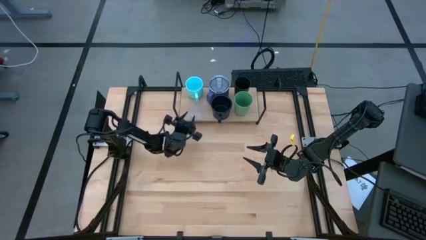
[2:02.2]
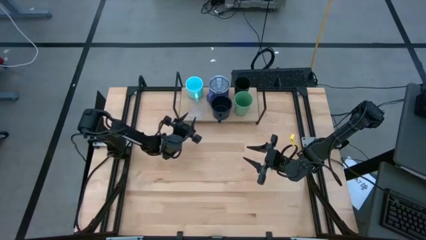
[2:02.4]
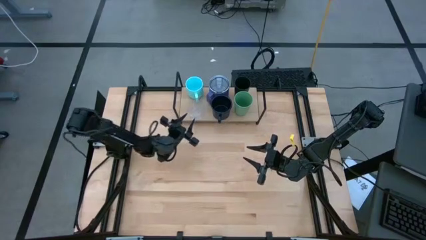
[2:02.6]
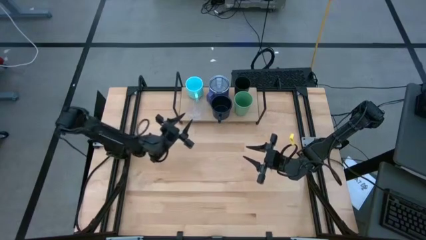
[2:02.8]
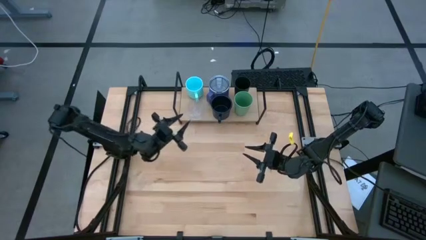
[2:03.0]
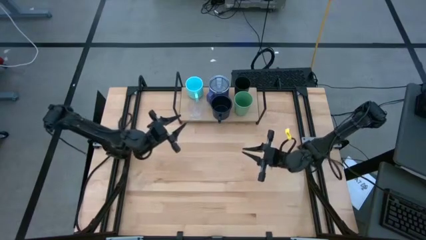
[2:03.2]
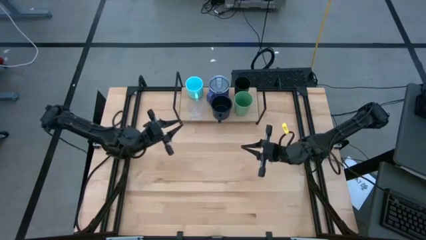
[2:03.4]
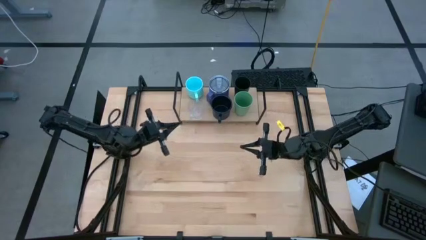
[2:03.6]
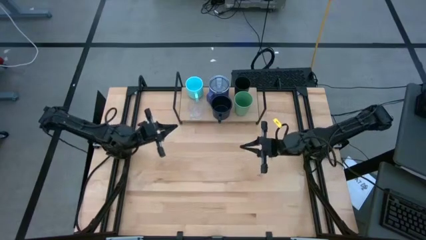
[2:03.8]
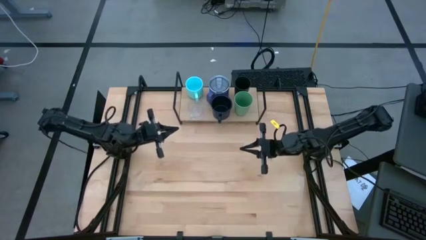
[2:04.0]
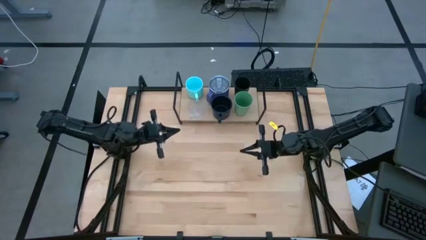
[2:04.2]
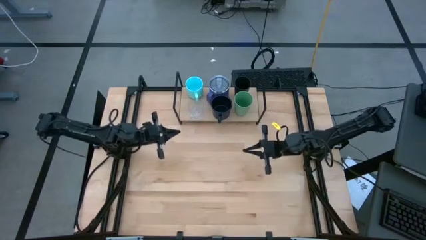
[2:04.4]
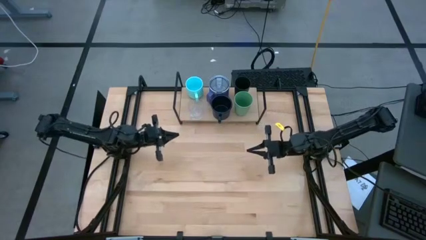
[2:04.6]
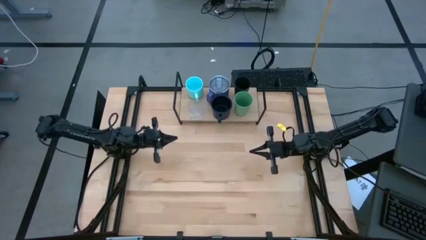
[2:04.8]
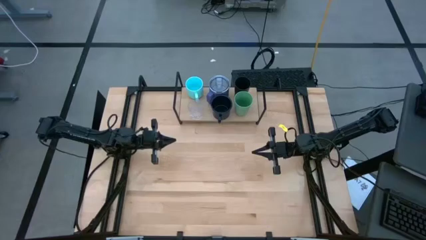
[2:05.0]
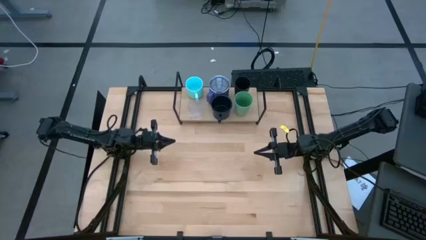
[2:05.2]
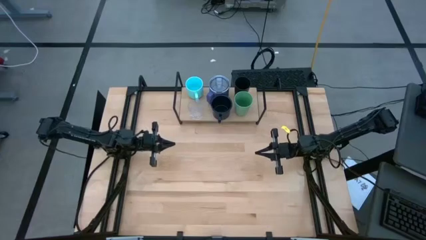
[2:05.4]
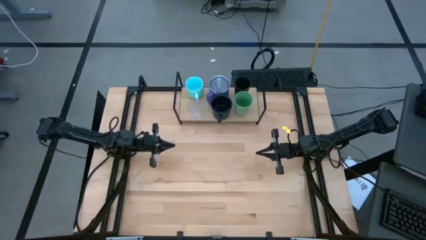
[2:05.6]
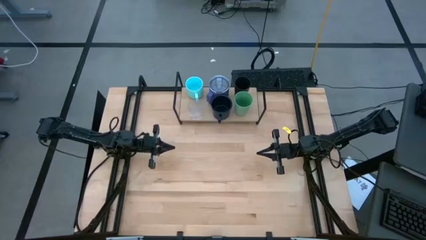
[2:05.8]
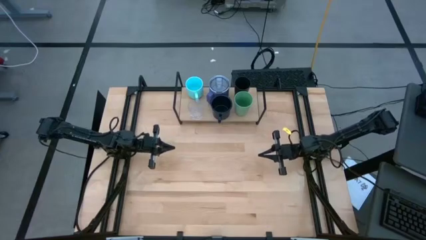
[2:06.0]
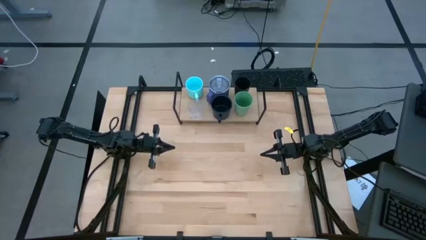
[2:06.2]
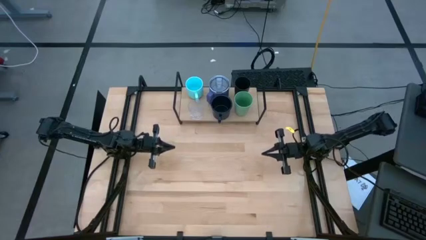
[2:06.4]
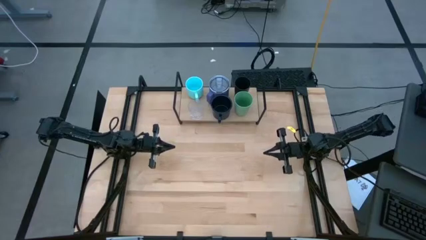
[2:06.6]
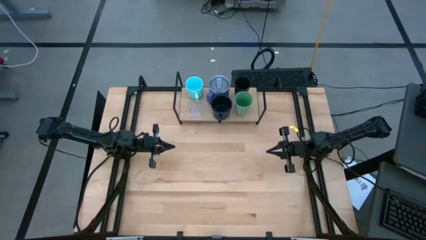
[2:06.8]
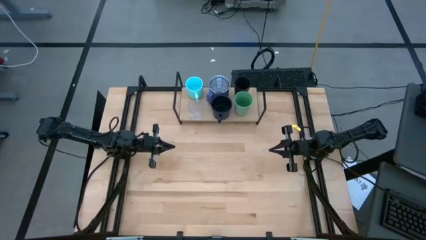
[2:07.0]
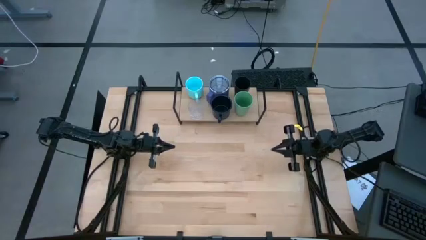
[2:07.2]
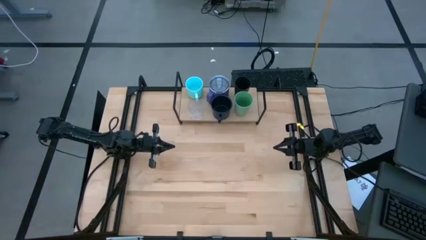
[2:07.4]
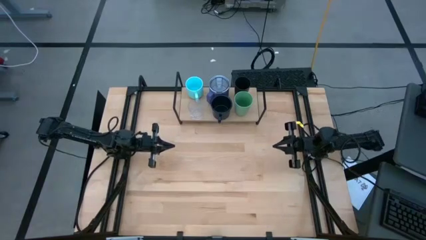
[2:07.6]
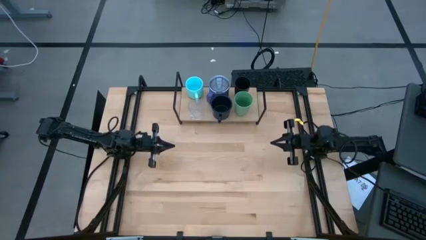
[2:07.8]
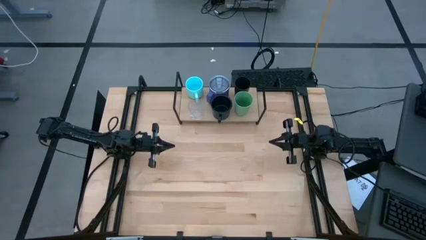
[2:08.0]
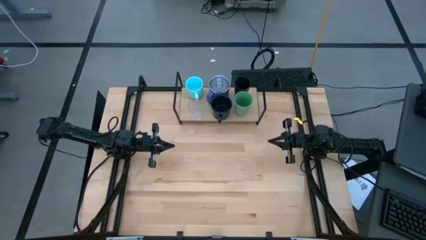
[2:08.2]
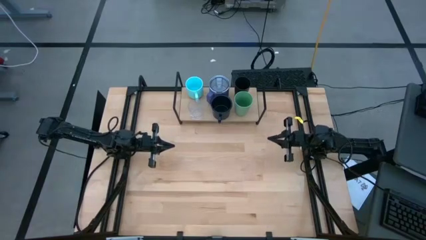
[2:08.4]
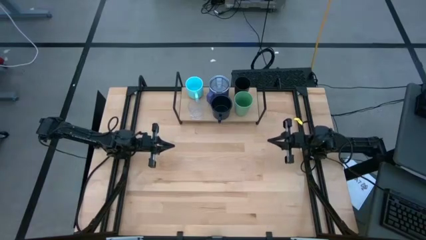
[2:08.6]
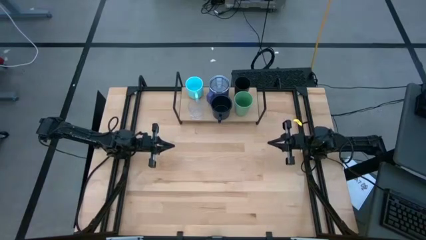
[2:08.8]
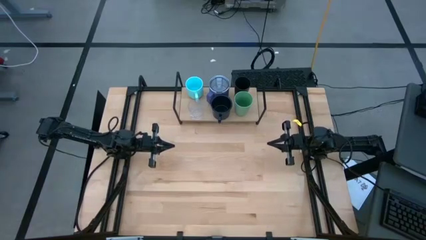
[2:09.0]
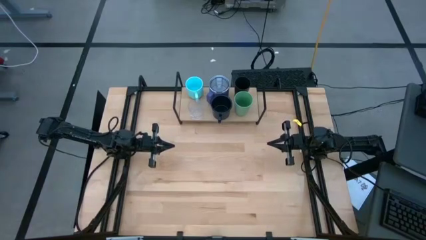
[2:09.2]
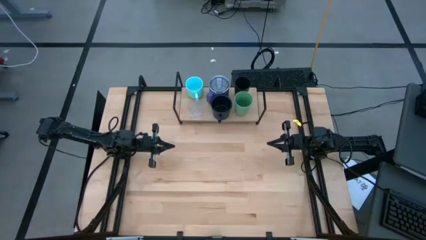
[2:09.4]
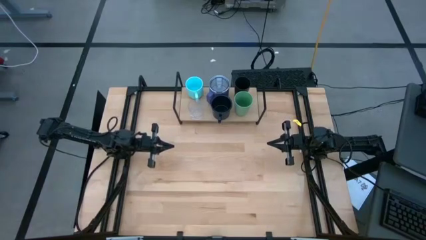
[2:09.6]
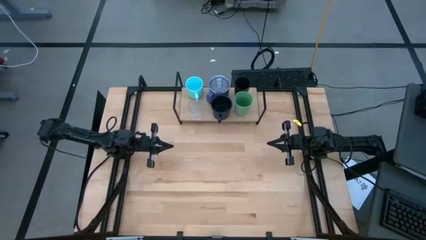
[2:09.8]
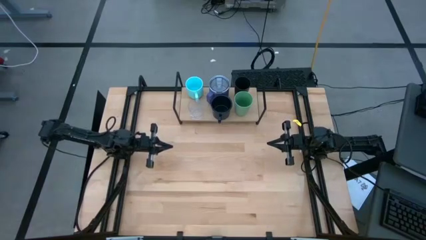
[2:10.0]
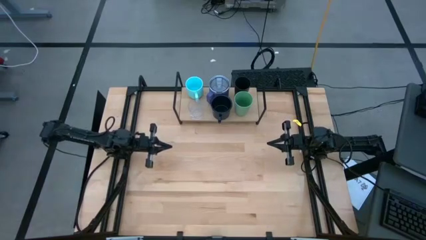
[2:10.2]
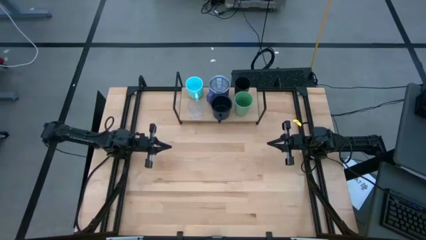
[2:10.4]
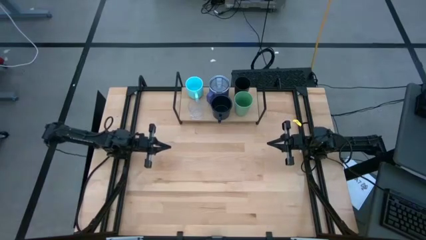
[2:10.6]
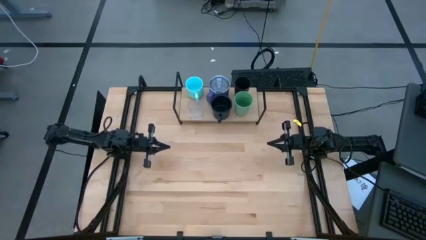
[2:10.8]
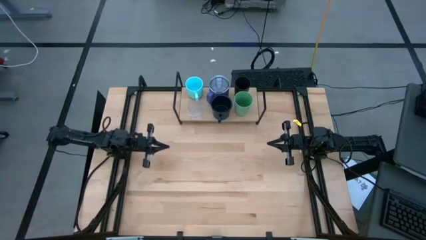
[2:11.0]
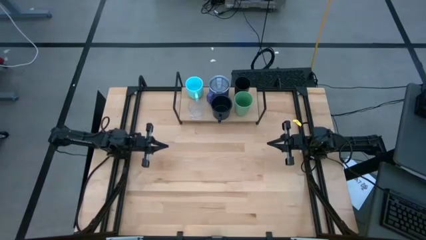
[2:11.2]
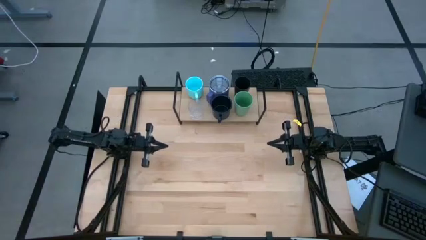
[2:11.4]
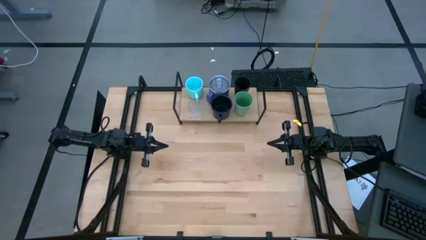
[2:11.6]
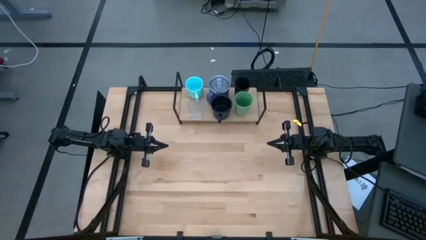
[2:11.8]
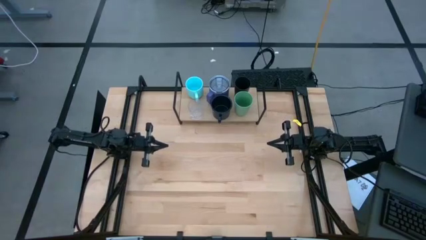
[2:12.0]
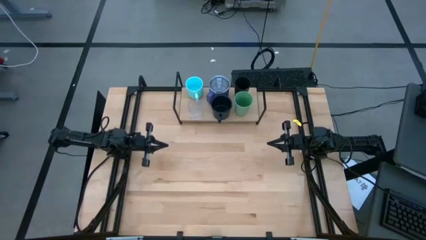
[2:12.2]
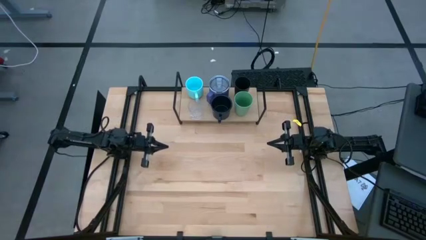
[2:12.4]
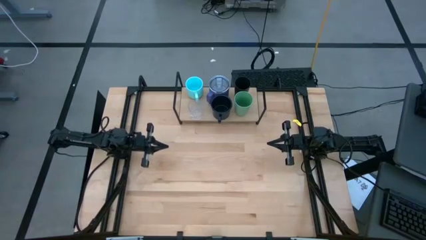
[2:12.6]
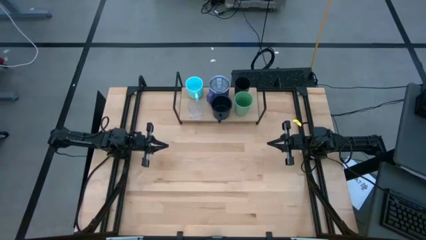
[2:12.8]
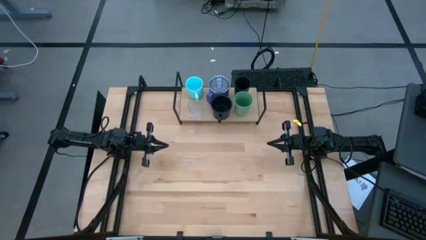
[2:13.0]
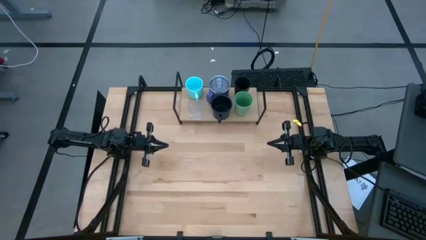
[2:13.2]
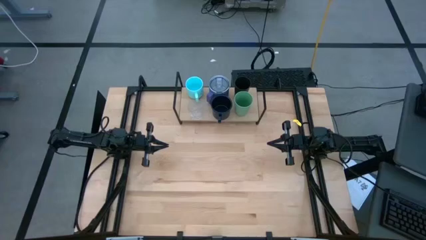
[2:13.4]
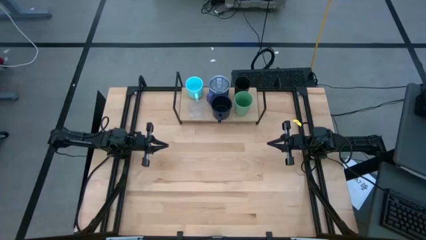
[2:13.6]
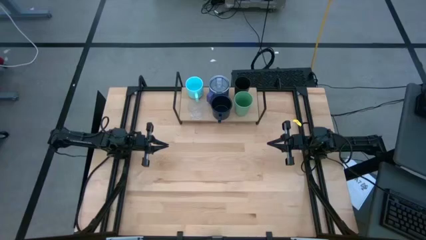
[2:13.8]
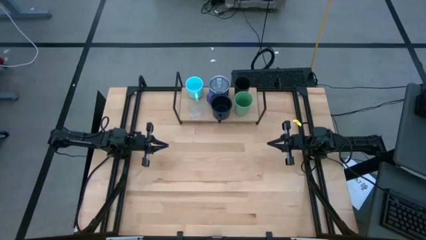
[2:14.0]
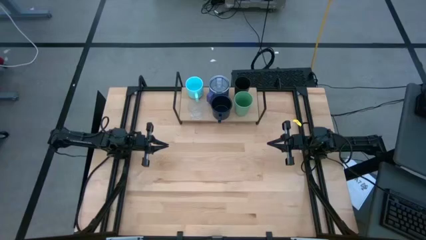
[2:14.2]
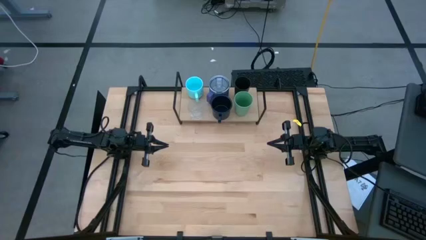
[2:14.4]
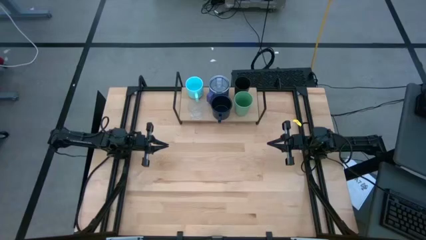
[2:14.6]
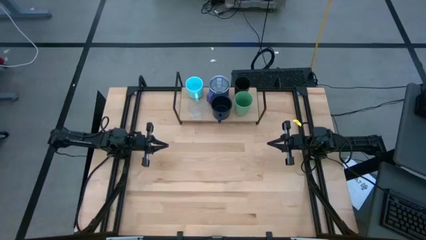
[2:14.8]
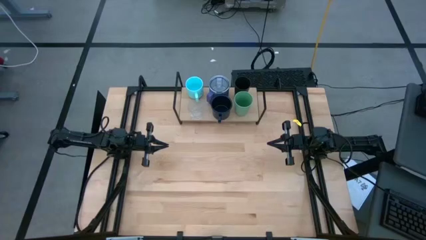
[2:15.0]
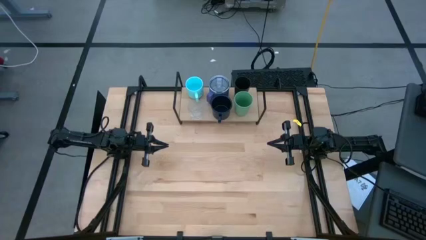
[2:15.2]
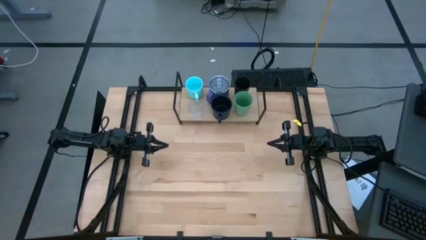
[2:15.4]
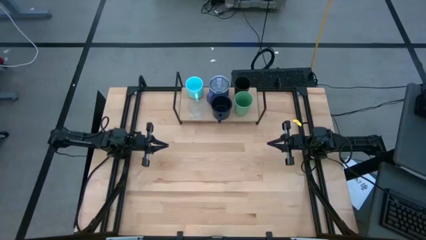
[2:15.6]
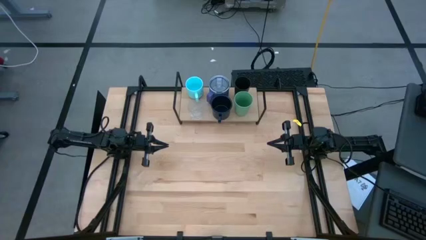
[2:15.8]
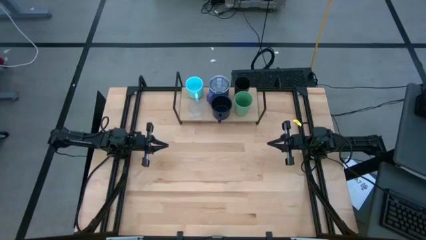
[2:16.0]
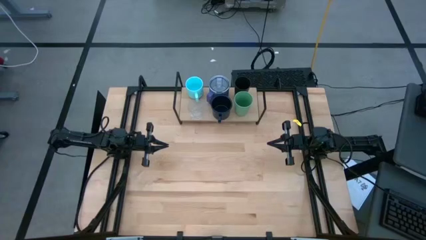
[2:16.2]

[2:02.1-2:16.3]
Task: Stack small to large cups/mugs on shelf
Return to Home Position

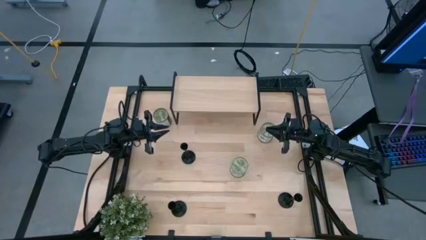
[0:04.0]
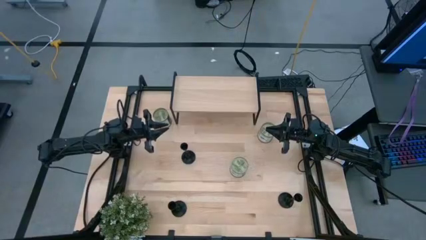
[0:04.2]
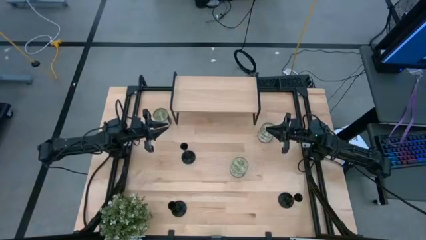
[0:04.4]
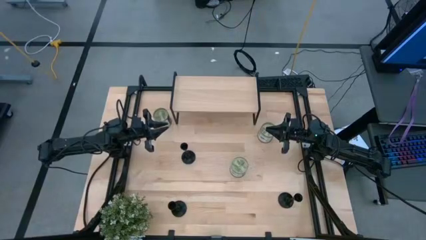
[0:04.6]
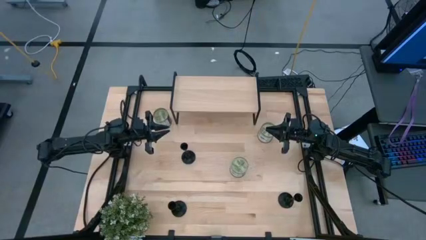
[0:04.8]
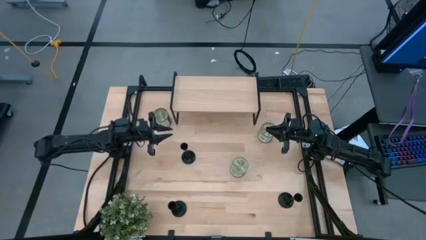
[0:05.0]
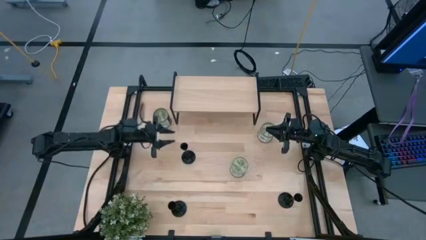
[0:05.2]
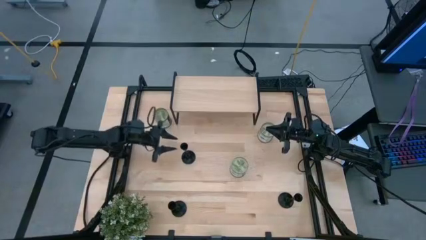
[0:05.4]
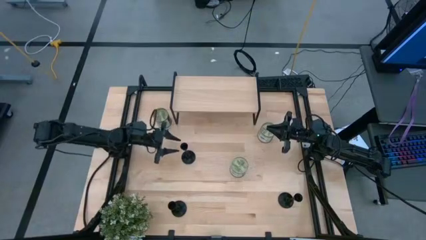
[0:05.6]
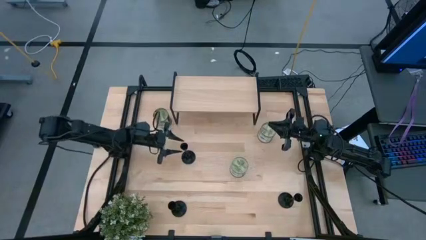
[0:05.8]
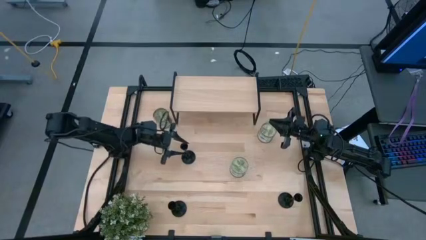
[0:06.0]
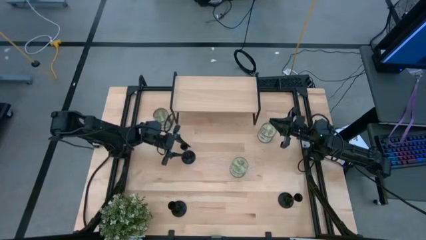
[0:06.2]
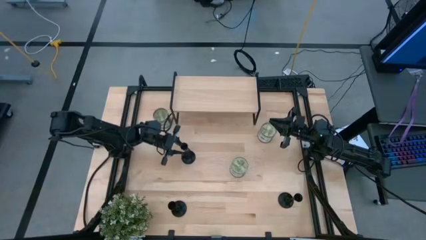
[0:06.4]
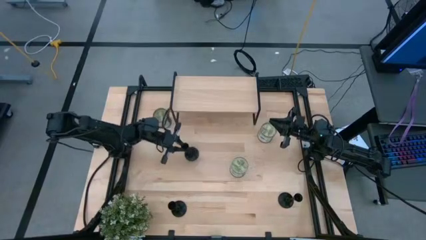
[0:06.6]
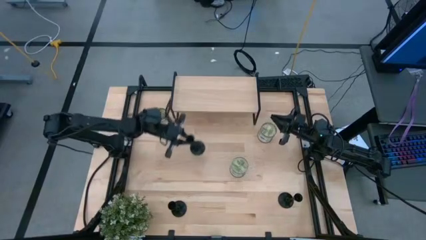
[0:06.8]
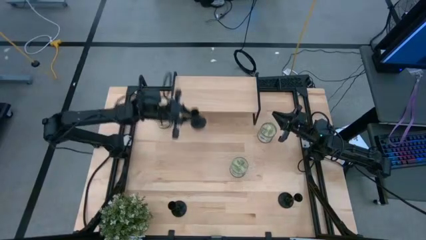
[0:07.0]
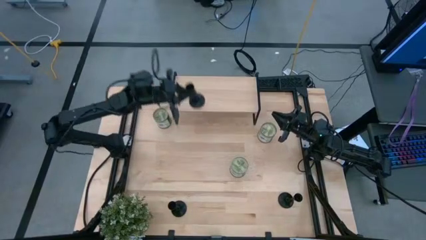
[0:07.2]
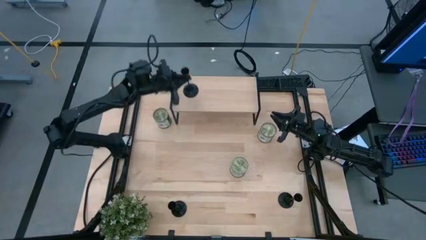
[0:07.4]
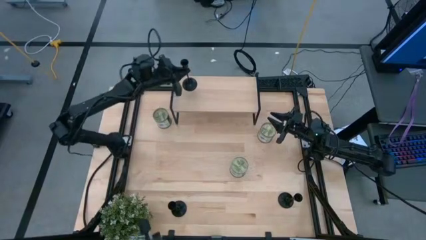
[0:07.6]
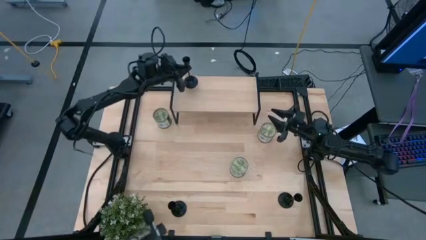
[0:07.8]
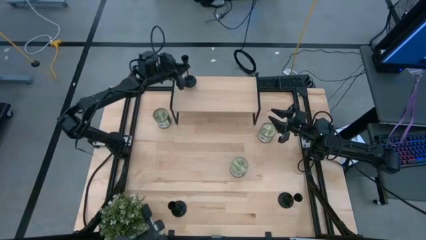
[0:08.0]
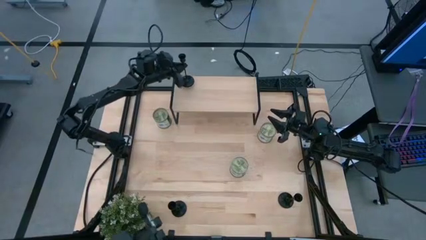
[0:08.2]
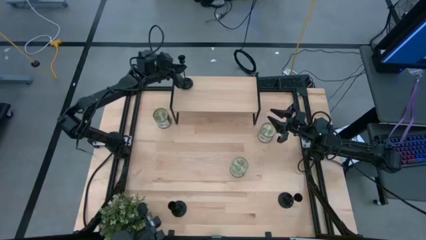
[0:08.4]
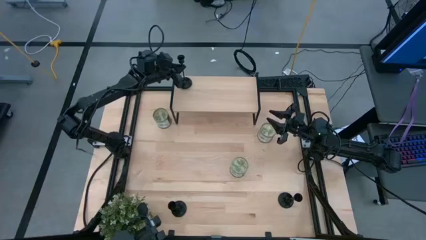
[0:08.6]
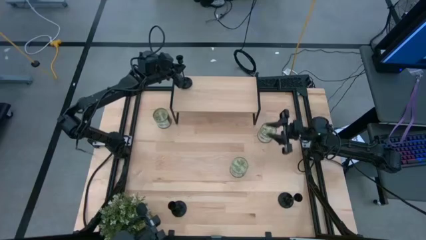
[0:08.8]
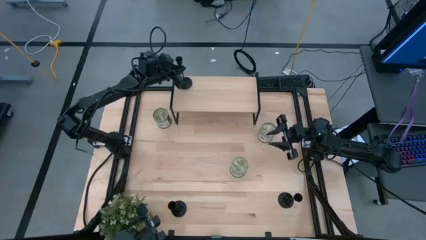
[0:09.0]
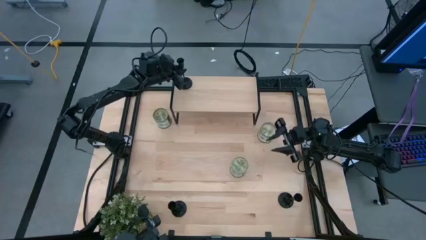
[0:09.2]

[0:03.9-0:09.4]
Task: Pick & Place candle stick holders
Put the top black candle holder on the shelf
